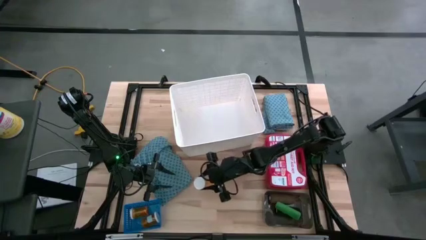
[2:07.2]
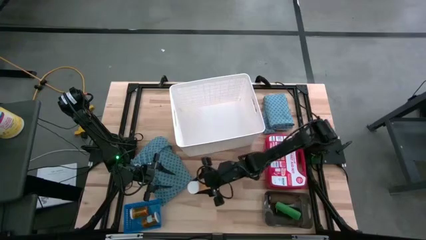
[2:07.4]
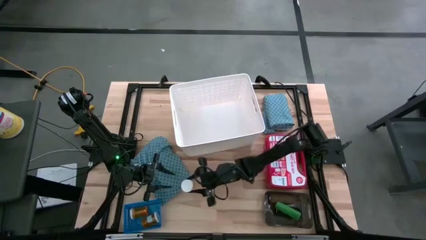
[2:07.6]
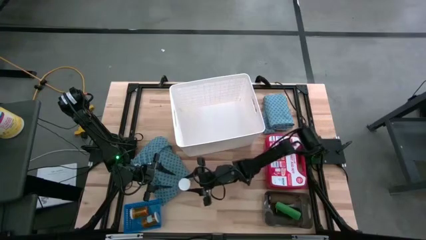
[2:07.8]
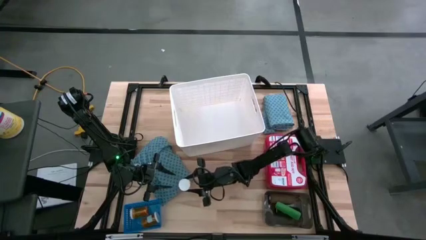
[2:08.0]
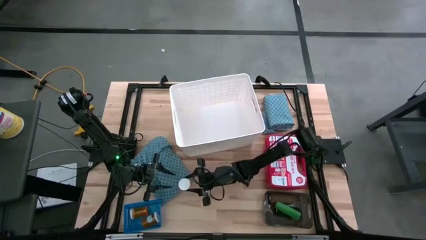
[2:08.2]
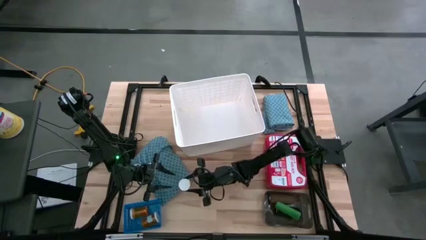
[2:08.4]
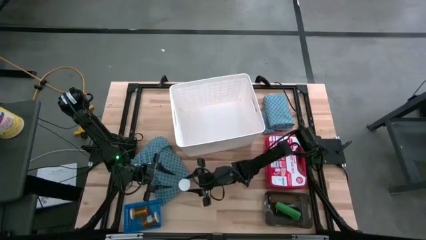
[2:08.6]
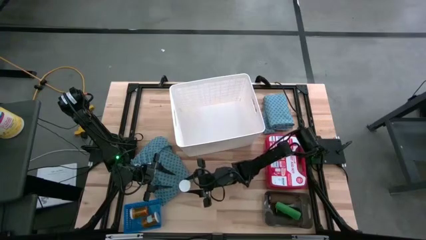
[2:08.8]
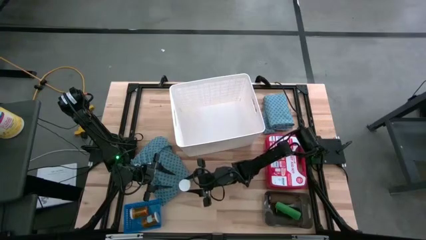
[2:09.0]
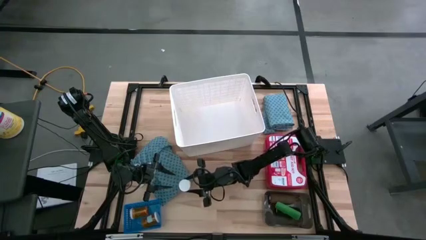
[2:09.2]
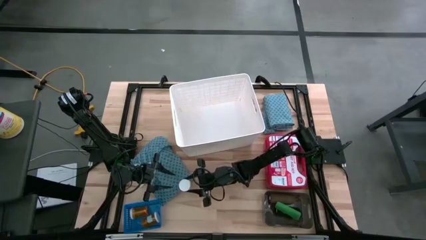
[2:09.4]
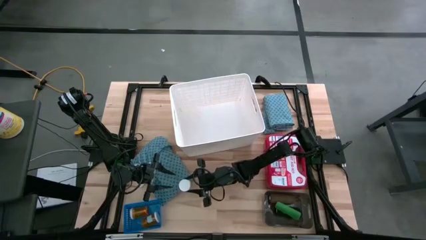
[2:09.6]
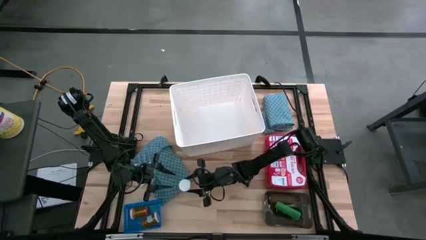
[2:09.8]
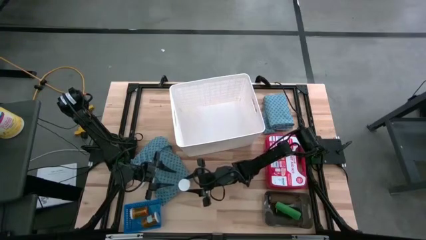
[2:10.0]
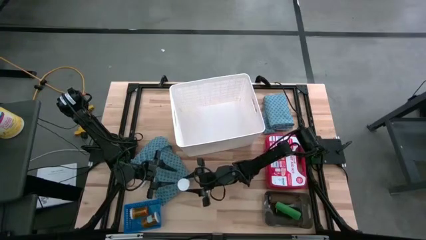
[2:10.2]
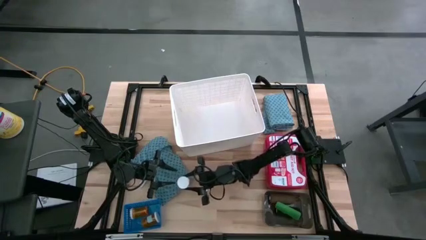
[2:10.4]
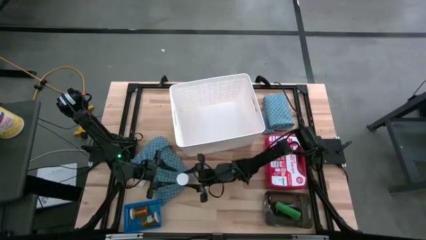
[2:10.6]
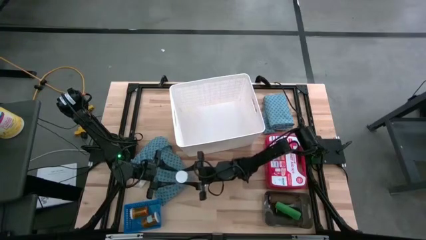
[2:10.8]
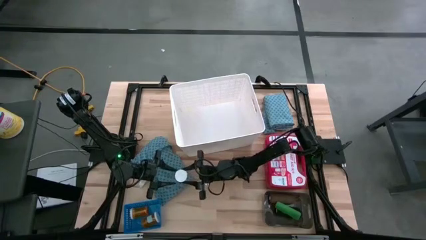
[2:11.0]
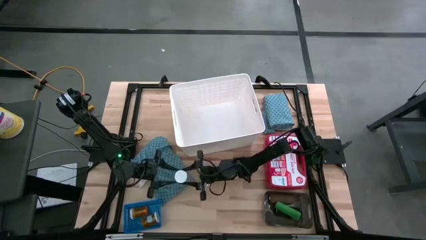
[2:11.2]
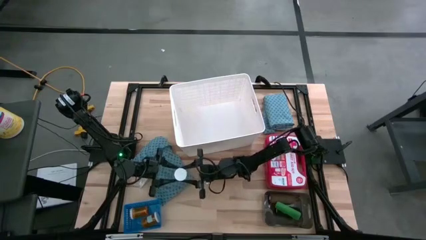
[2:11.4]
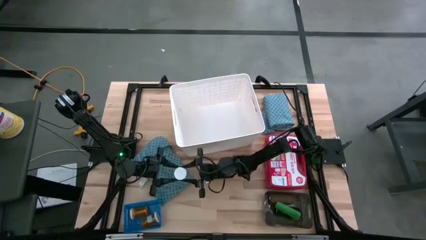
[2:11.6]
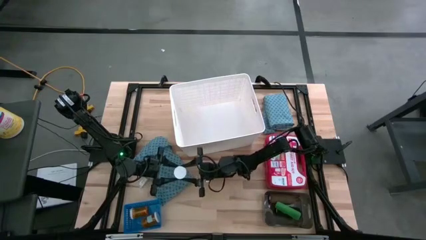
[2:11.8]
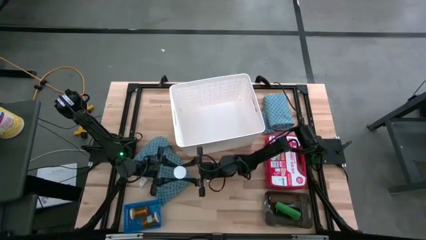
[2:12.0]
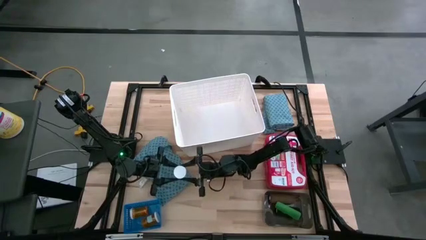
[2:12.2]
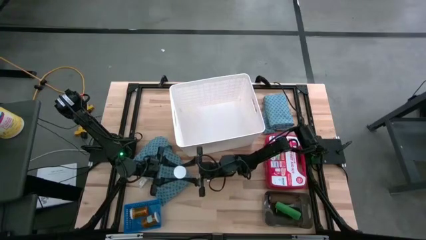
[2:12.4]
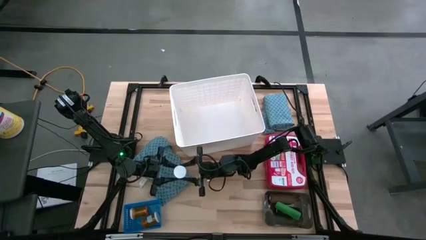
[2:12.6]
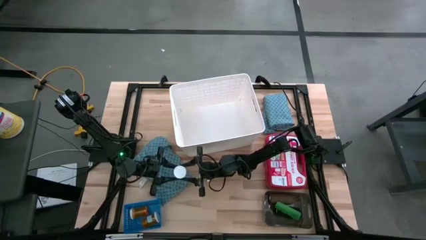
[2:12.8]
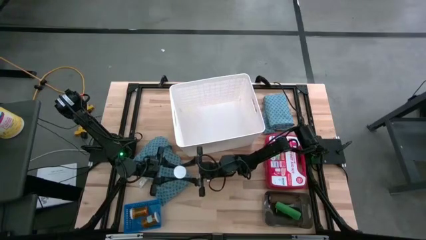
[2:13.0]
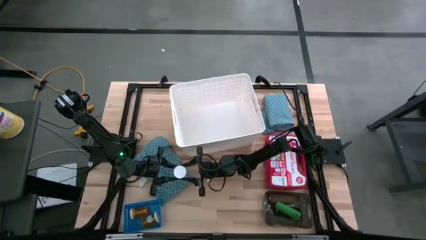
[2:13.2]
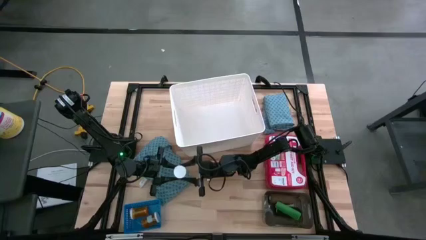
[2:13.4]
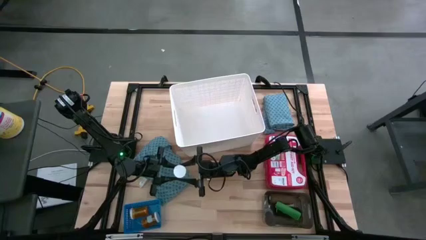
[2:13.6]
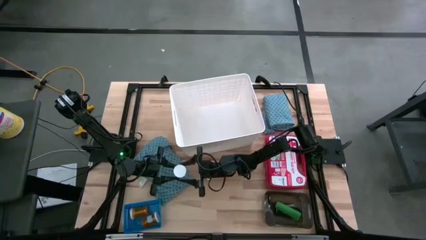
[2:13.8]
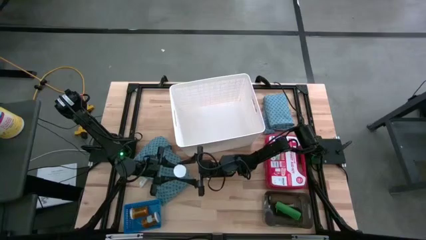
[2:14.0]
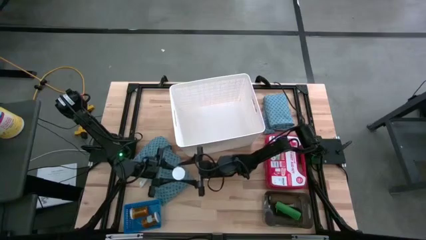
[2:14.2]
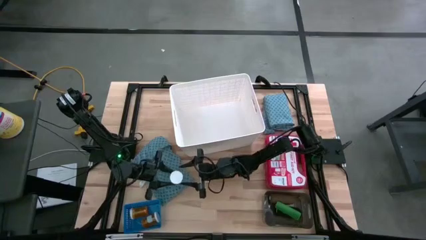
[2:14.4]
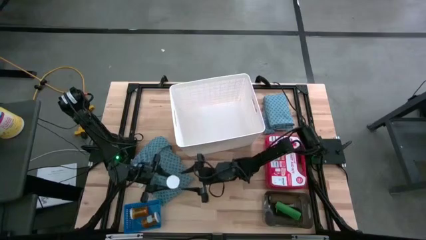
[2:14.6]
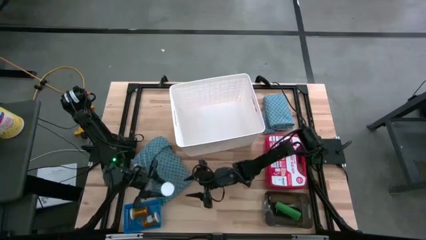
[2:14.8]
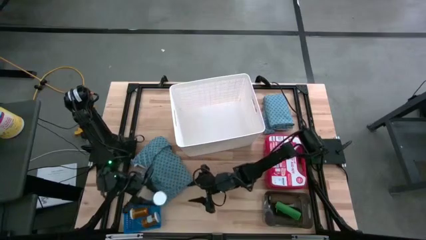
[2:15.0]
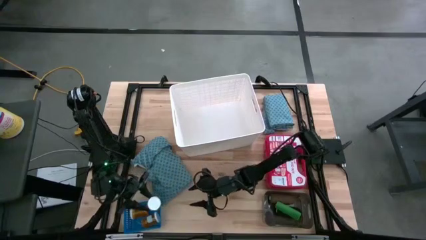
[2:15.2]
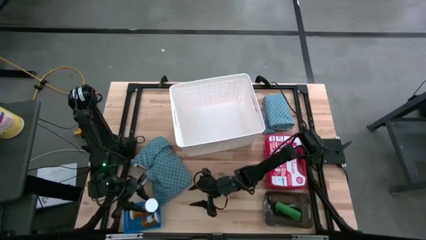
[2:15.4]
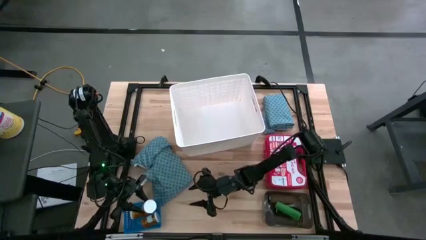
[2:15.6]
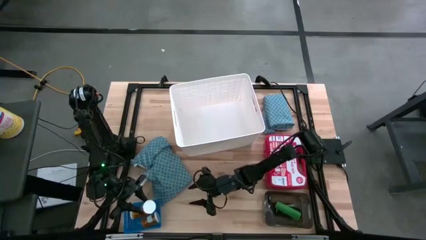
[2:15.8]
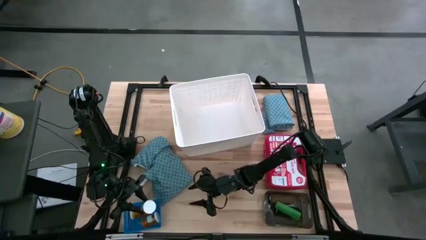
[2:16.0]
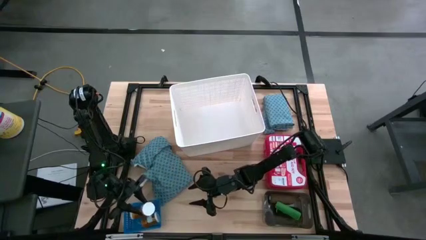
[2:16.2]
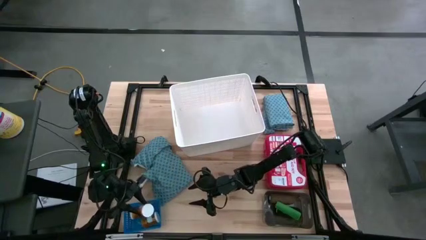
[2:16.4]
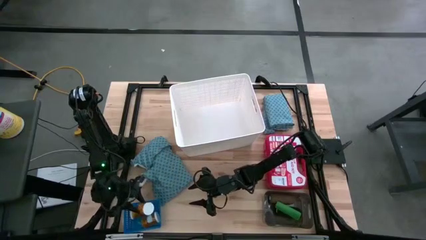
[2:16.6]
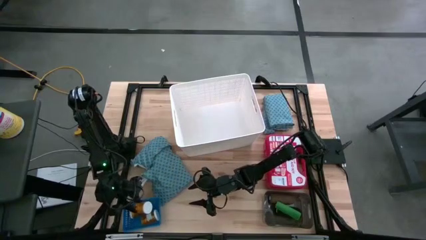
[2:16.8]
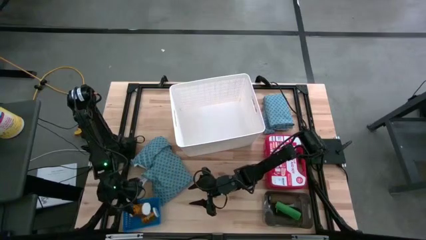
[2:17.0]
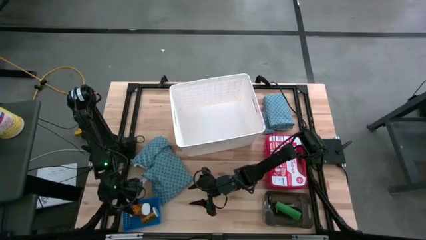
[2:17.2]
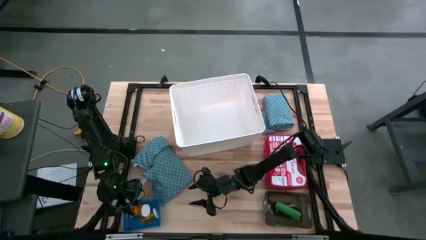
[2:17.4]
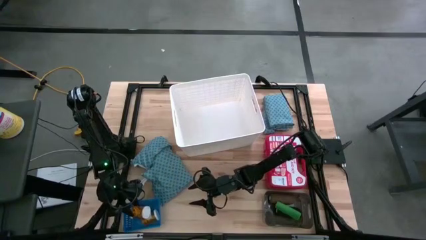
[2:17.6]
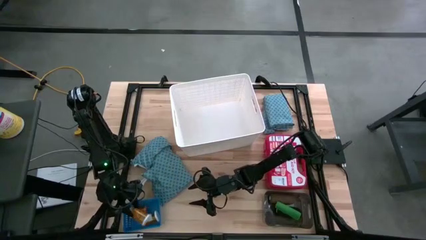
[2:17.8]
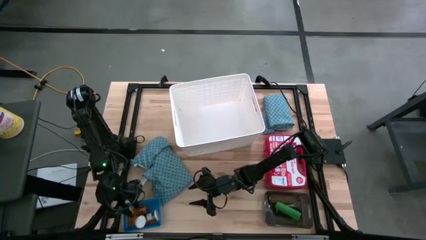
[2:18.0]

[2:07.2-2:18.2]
Task: Pick & place medical supplies in basket/bin
Put the orange pill bottle into the blue bin

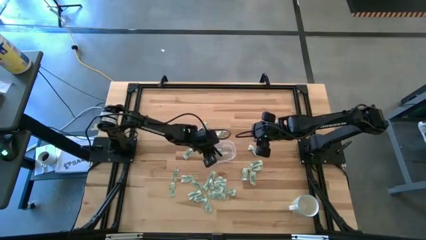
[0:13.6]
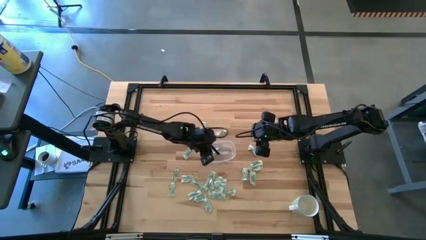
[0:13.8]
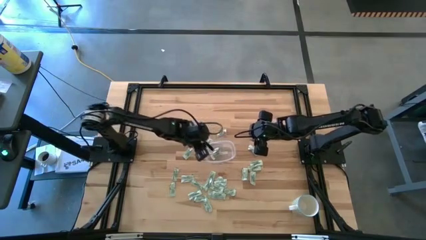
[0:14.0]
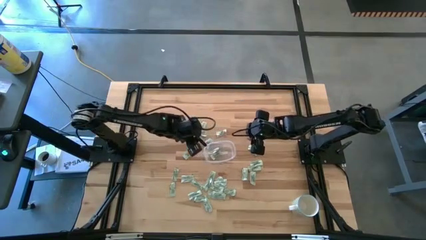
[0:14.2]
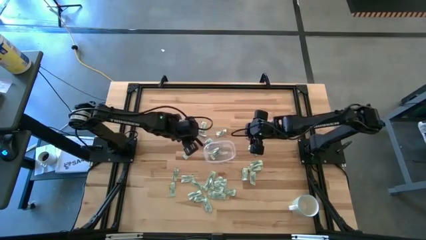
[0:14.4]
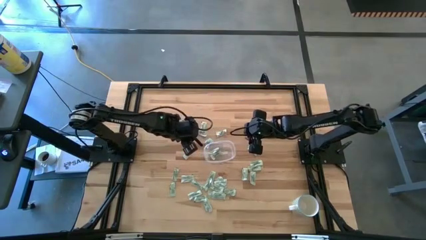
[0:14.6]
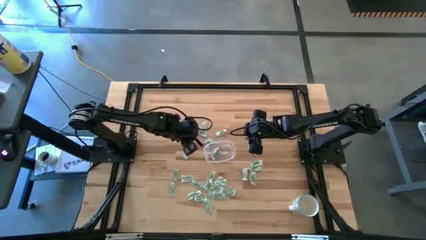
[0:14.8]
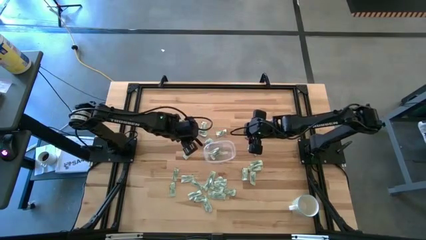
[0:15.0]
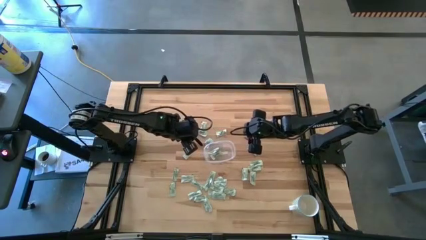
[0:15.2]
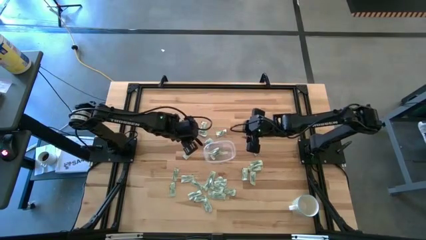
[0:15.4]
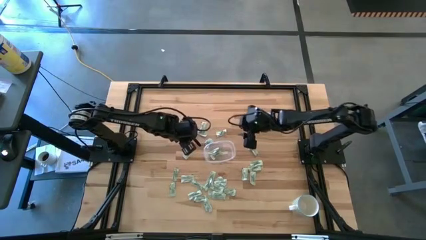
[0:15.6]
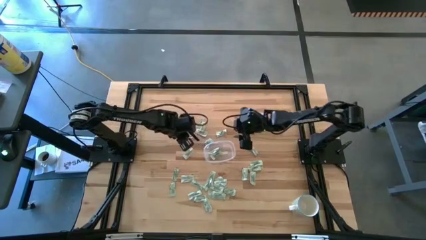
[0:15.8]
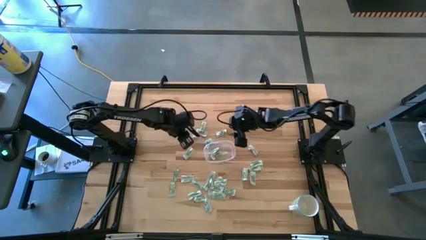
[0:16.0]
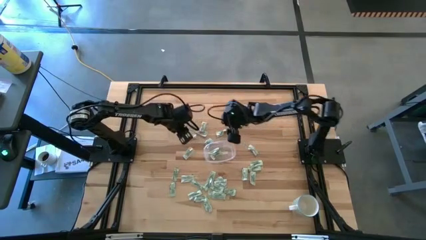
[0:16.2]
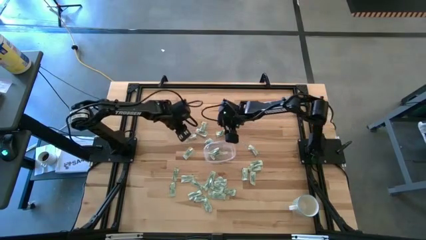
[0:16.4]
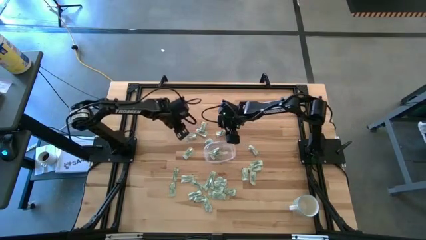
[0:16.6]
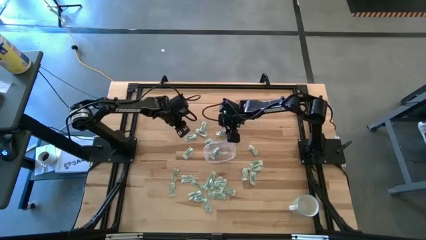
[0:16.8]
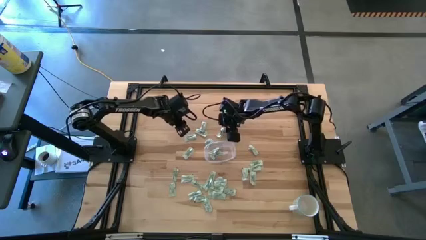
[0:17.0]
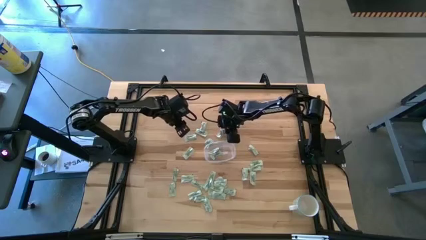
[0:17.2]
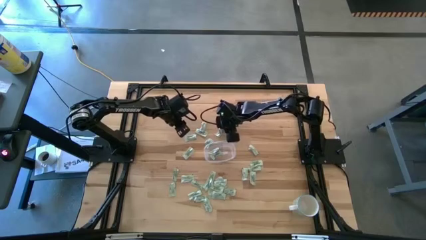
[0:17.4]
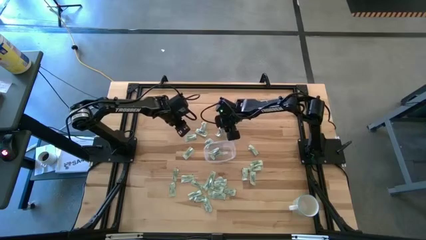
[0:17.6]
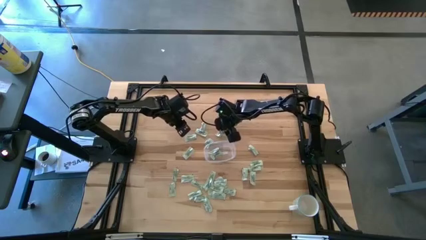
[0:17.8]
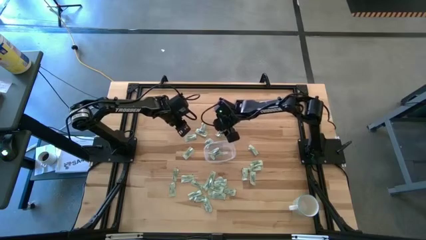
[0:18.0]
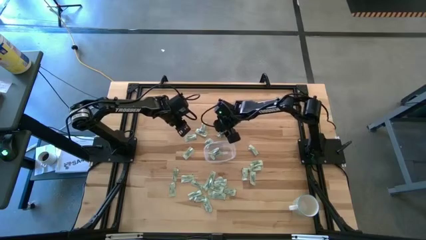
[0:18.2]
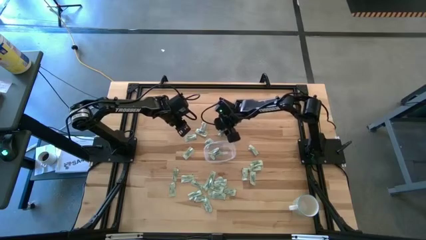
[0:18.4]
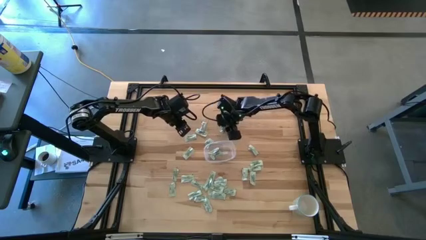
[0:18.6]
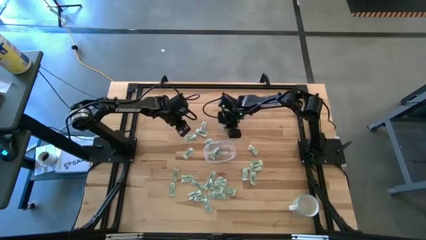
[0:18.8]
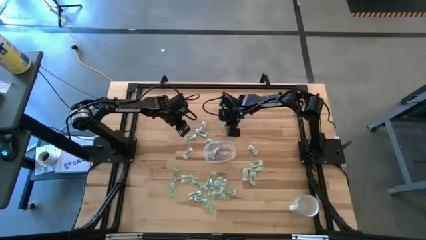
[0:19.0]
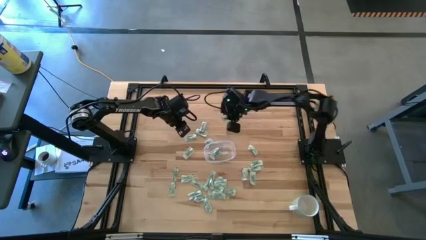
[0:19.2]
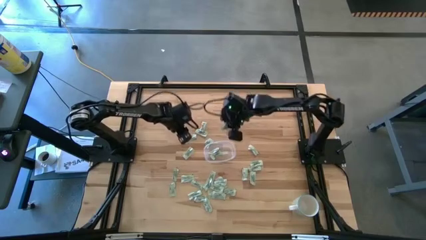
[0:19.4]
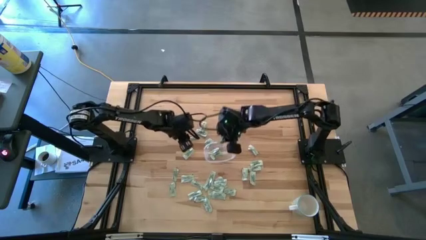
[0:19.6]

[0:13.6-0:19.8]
Task: Pick and place Stevia / Truvia into bins
Put the stevia packet into the transparent container
